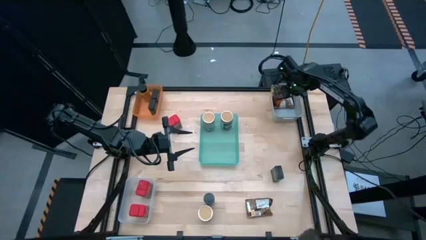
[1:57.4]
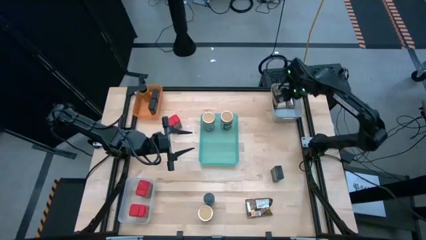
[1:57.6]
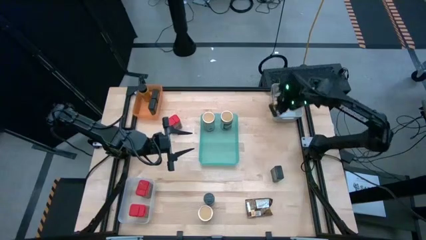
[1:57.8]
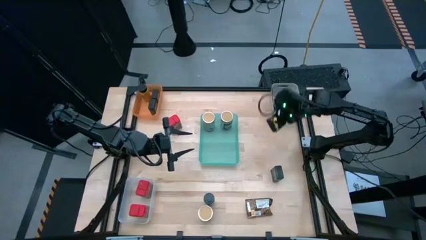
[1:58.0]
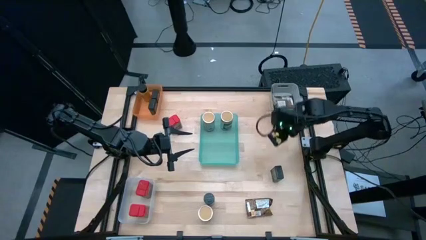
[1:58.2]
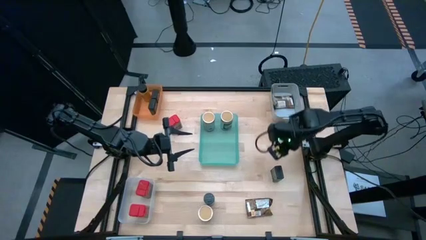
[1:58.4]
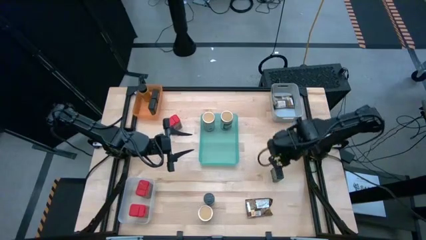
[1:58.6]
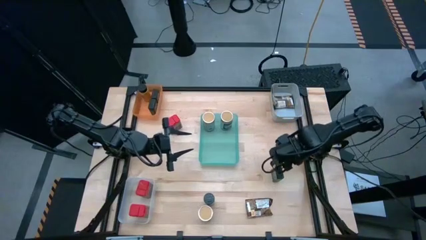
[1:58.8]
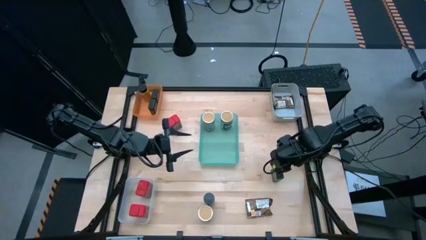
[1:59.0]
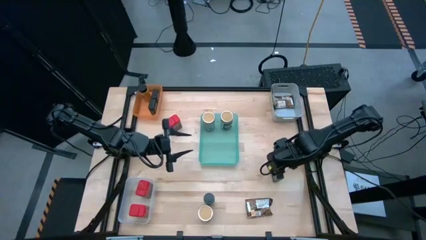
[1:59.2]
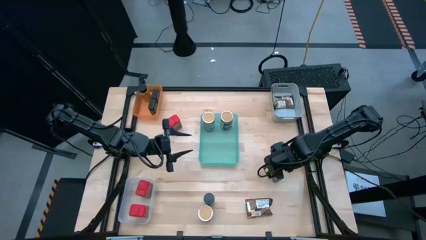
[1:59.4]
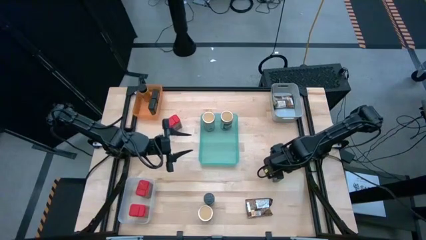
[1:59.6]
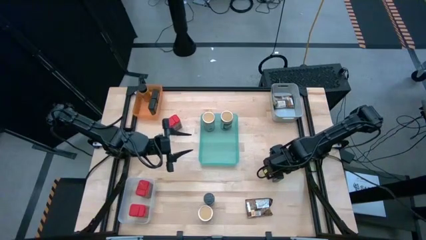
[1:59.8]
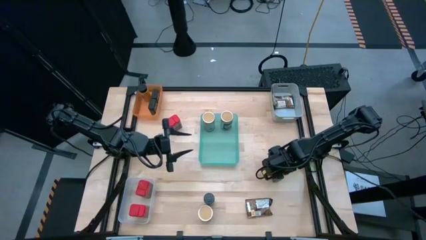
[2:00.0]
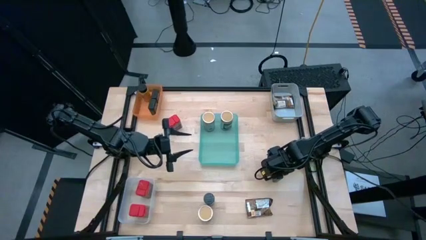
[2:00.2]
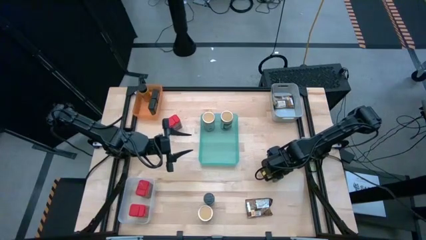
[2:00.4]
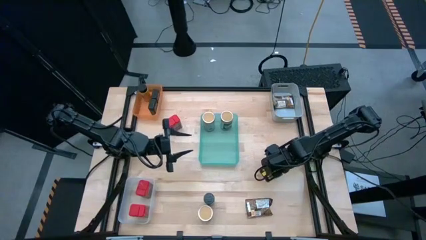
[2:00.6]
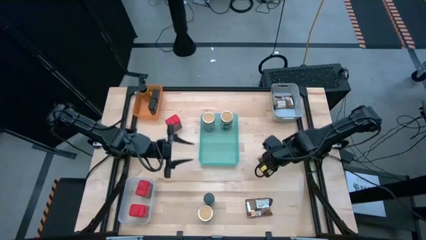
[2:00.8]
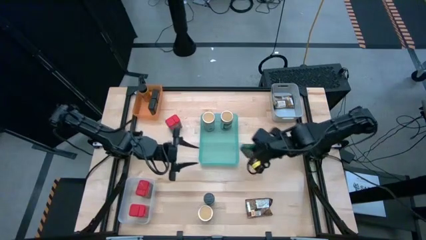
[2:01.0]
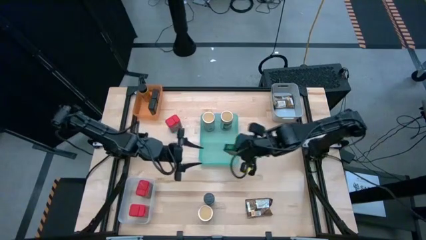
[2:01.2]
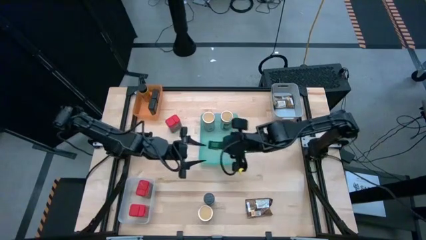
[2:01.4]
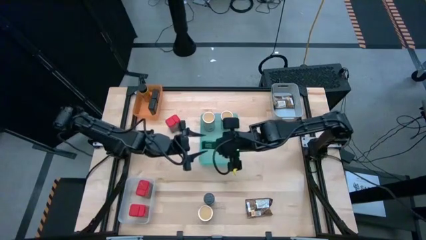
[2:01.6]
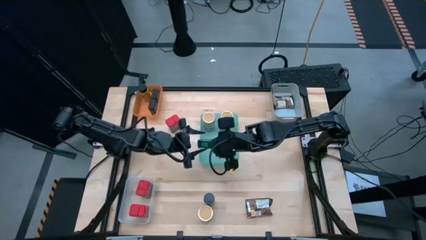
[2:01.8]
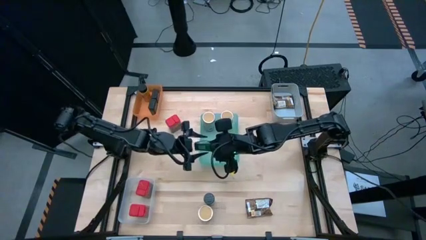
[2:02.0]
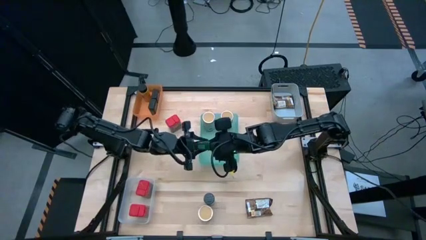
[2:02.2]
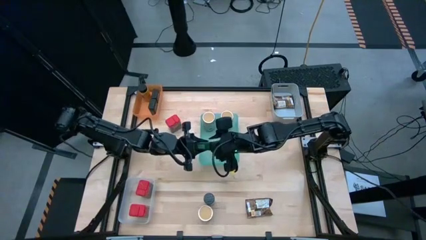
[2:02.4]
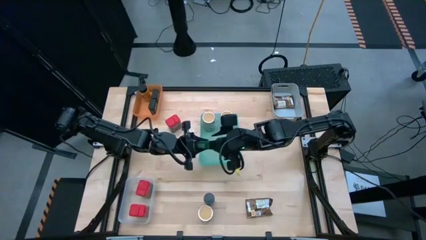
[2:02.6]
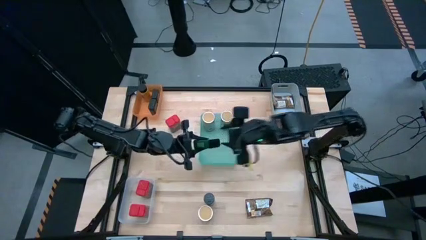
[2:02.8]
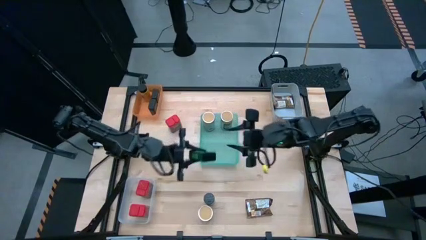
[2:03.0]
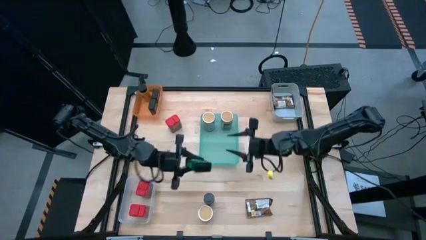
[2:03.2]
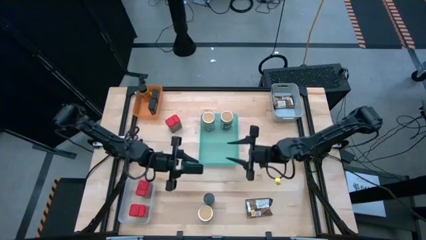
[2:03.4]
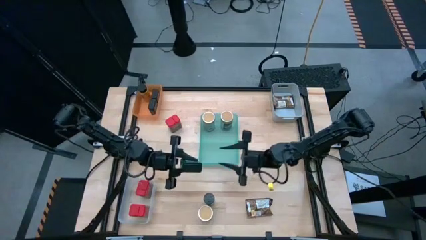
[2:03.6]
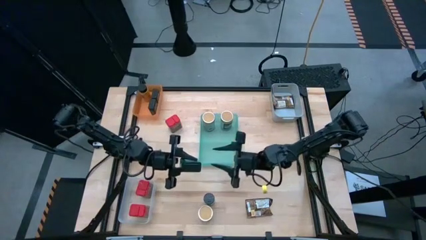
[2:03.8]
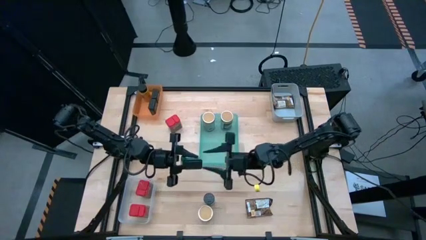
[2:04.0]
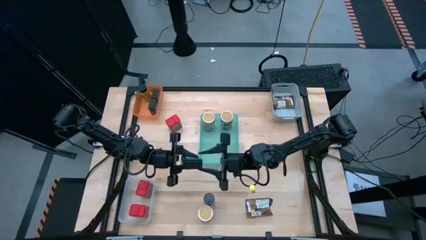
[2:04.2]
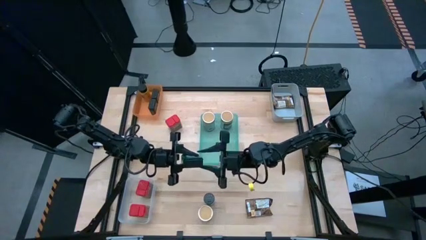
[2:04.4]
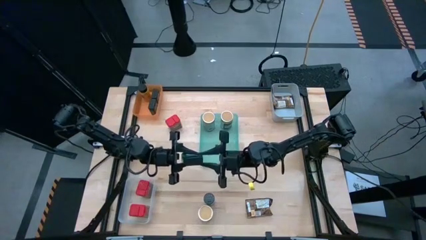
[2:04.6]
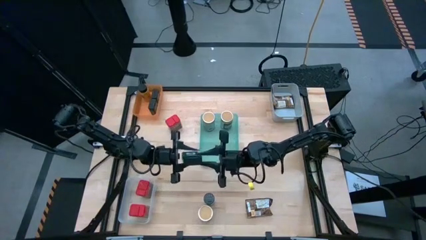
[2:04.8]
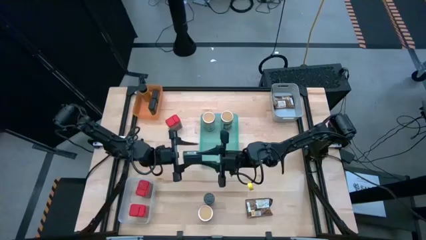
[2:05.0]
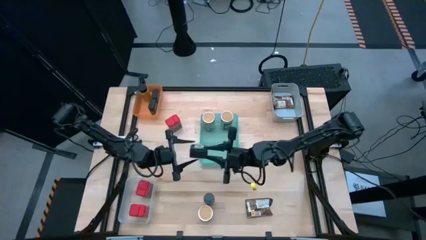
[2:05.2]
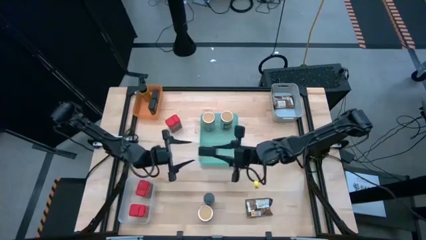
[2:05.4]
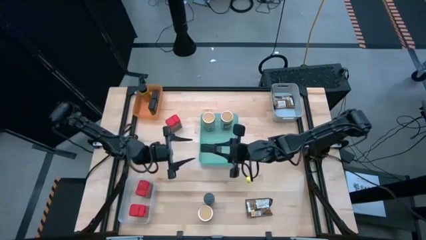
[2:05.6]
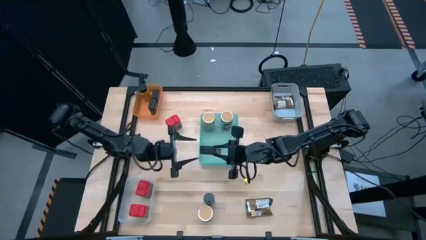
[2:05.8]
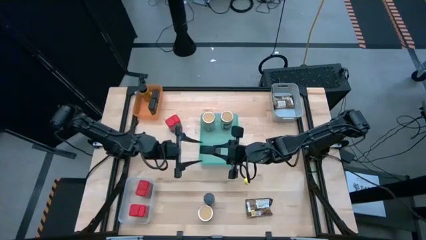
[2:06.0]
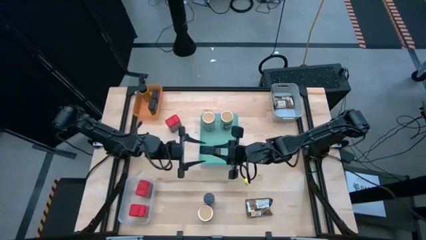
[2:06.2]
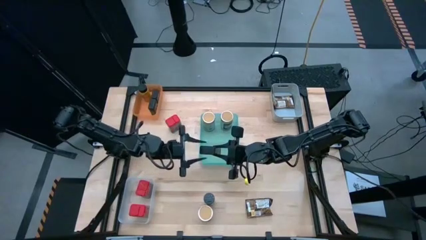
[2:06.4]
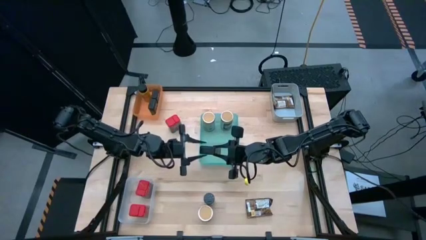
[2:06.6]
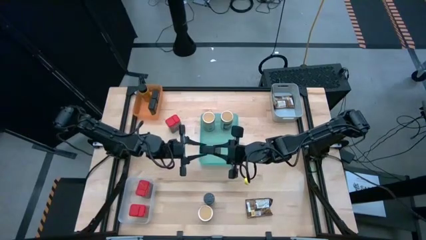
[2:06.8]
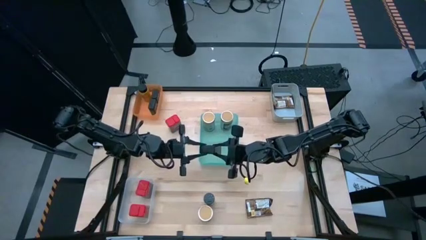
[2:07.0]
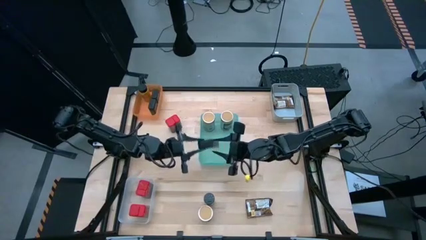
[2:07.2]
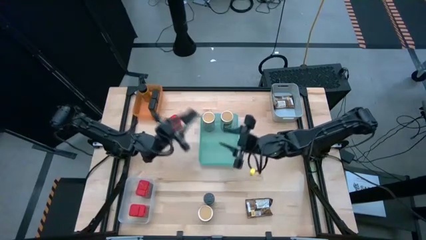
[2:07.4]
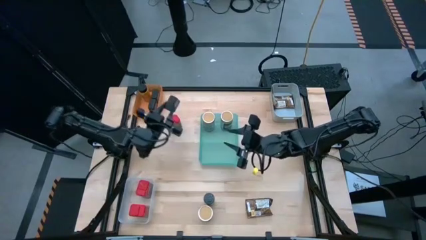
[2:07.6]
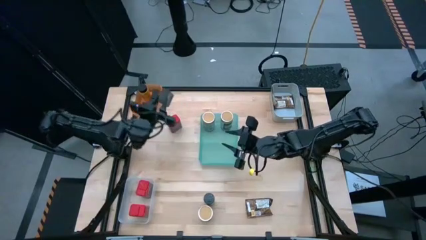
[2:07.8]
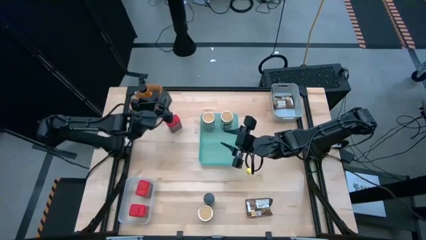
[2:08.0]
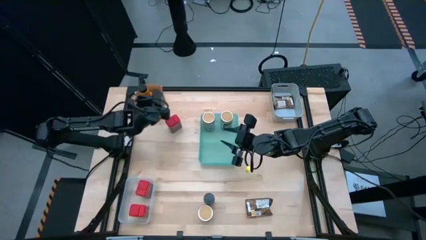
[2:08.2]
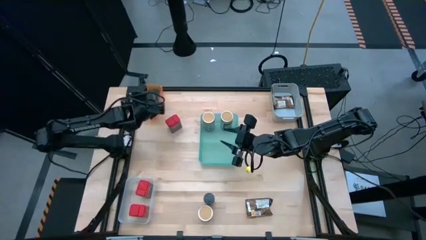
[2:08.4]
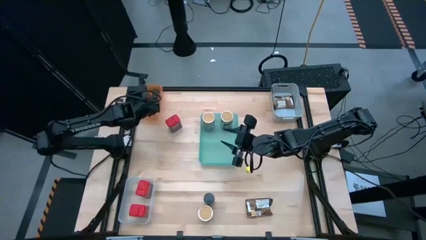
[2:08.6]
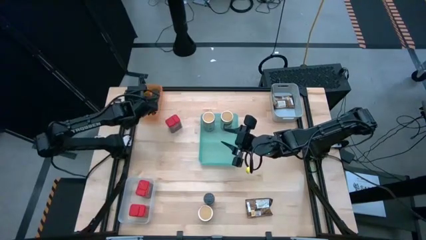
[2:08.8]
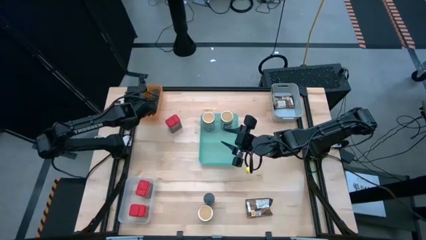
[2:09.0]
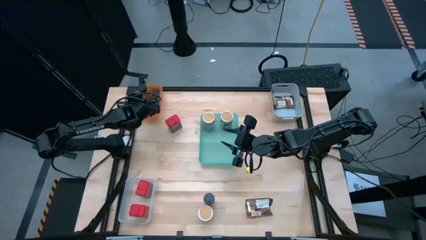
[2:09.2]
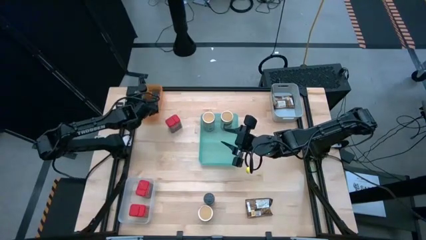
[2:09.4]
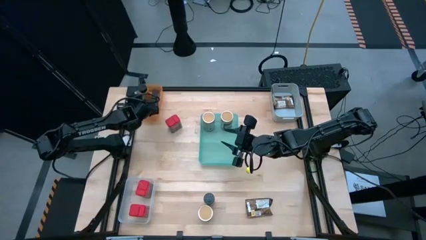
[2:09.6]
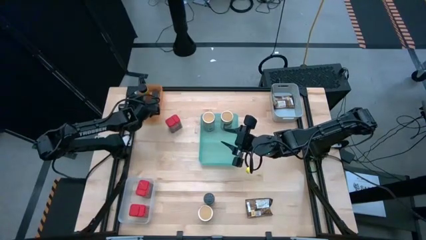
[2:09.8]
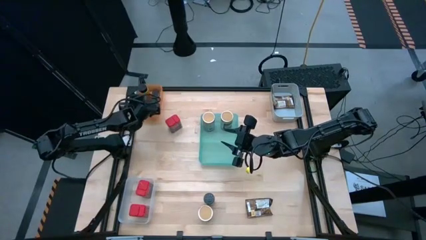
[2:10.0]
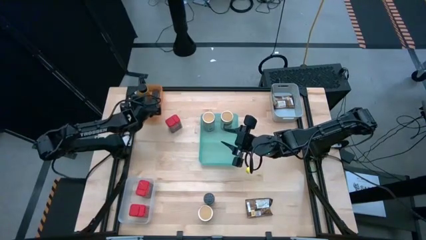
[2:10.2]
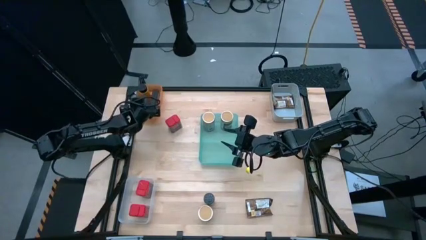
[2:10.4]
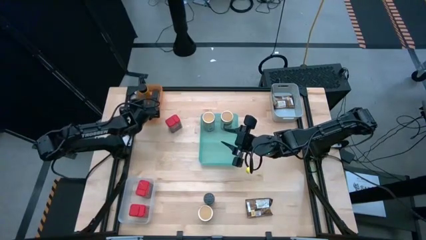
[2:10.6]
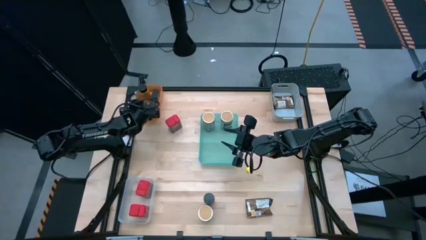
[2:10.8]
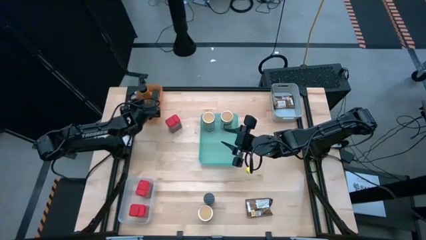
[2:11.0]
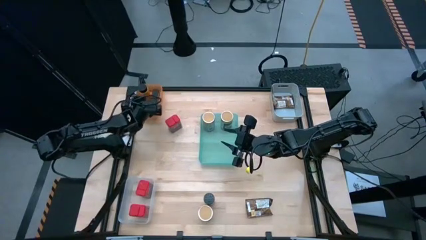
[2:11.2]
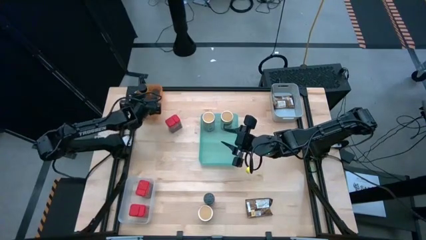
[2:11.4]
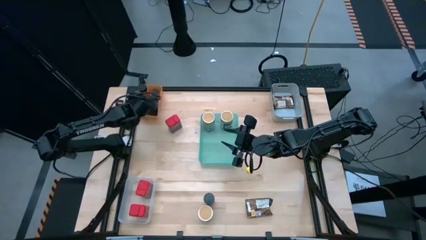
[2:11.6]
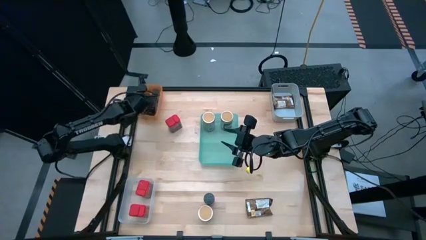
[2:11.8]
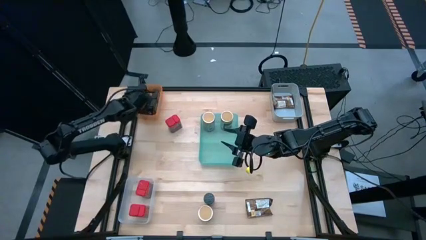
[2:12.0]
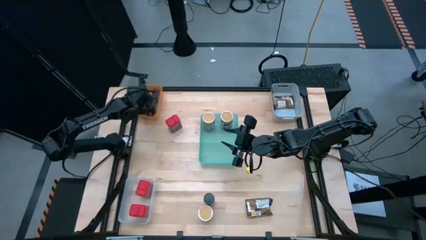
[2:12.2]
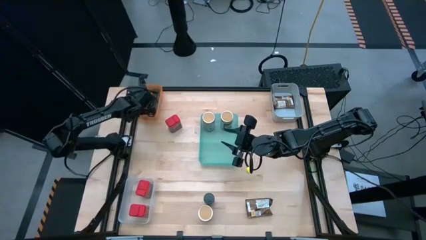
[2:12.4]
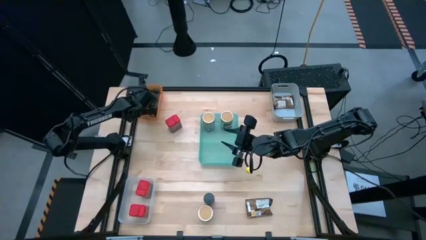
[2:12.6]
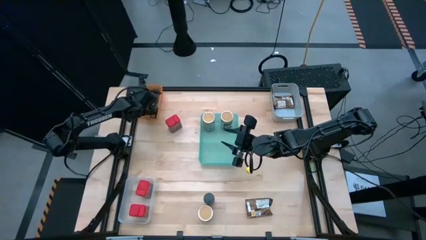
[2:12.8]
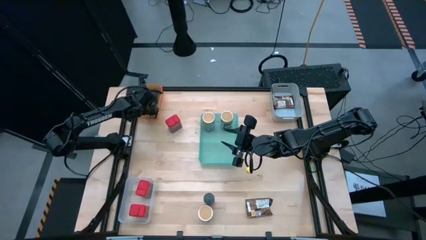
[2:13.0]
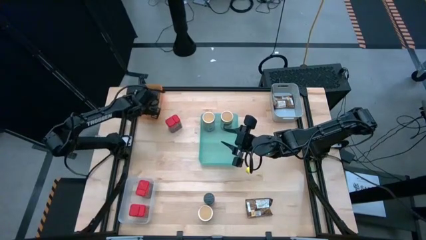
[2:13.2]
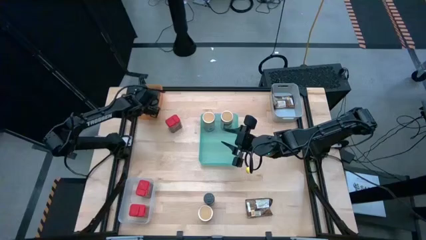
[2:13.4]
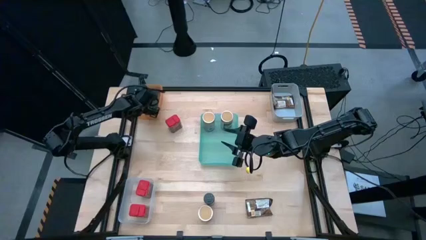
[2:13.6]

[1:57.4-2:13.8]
Task: Sort spices by type
Put the black seasoning can into the orange bin

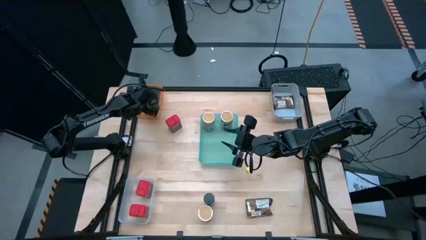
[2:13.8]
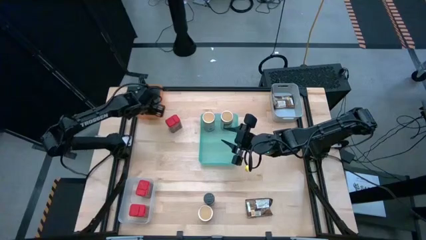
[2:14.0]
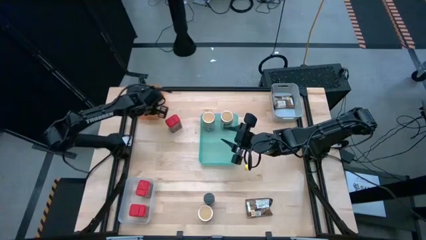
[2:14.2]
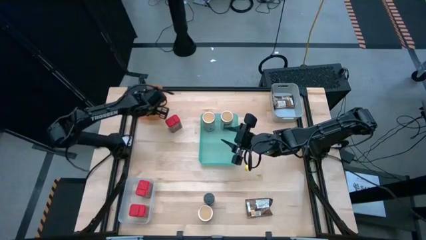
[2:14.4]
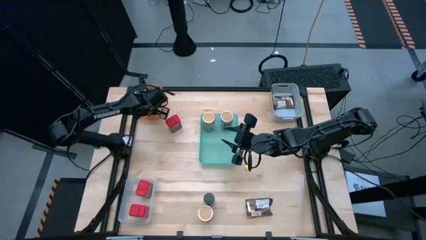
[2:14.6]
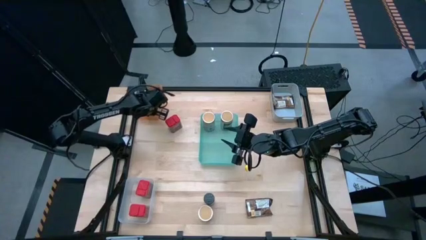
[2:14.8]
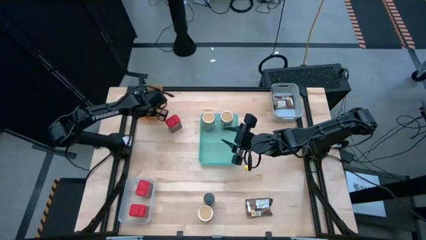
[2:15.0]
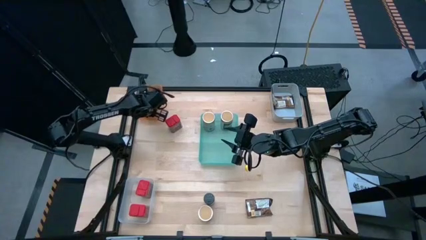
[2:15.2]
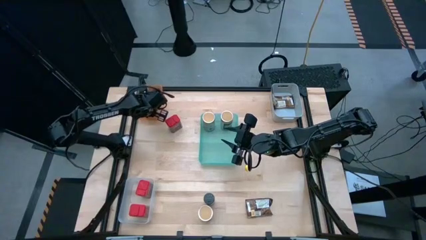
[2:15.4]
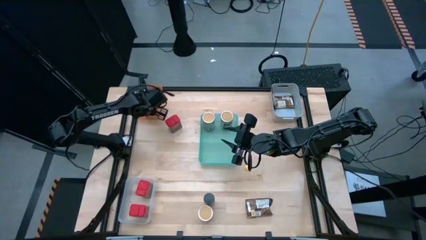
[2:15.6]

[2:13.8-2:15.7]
Adjust the black seasoning can in the orange bin
